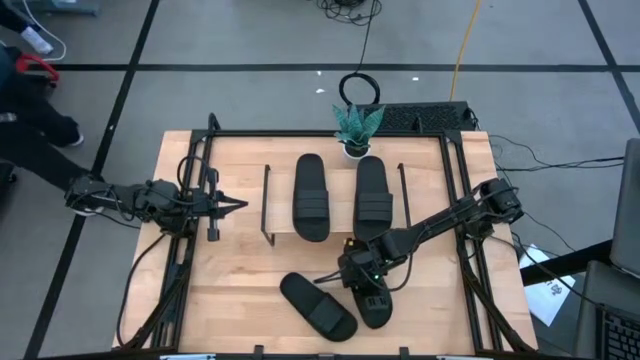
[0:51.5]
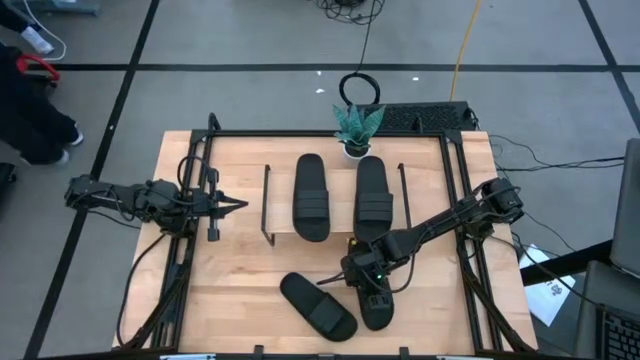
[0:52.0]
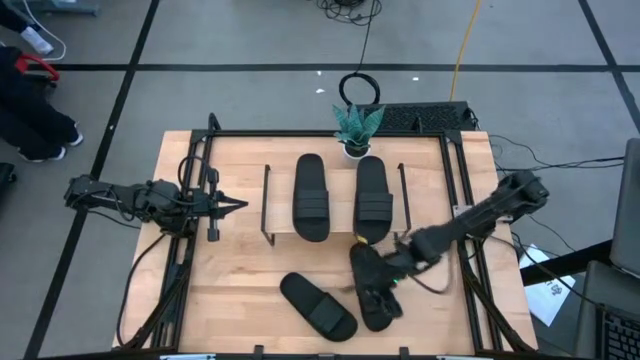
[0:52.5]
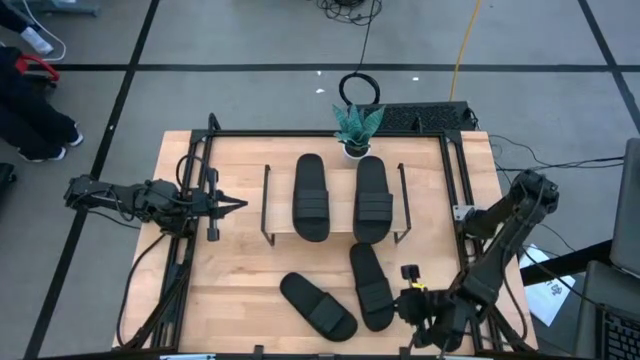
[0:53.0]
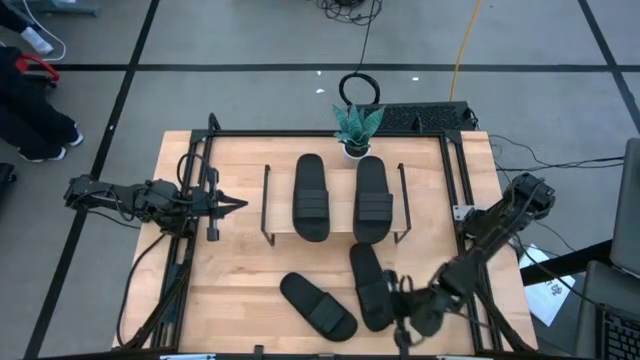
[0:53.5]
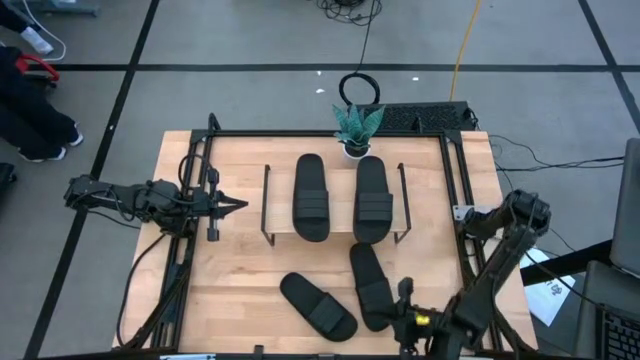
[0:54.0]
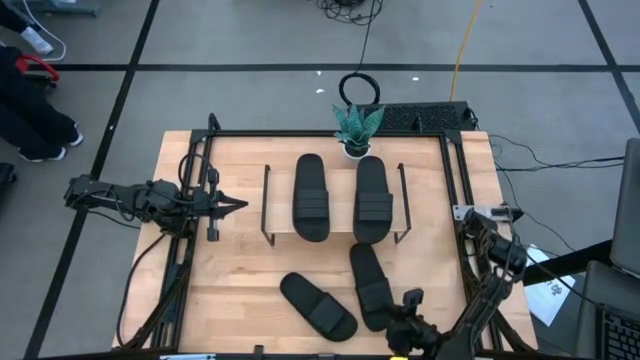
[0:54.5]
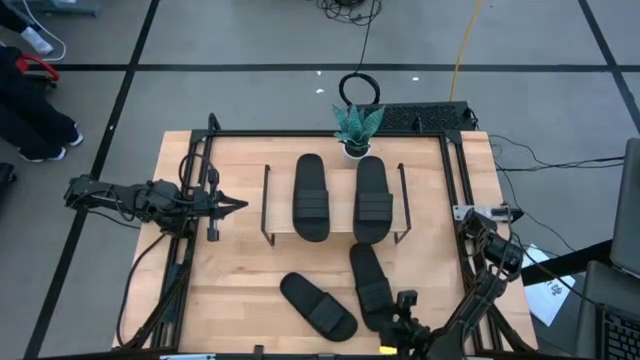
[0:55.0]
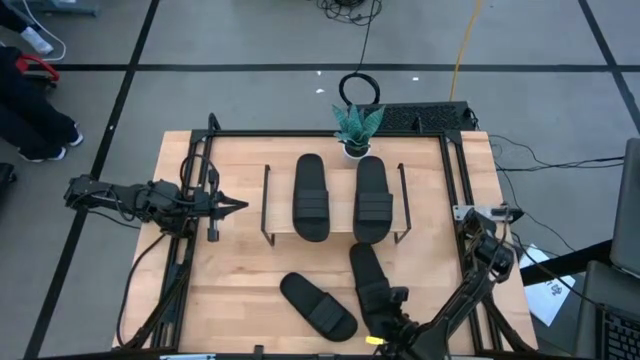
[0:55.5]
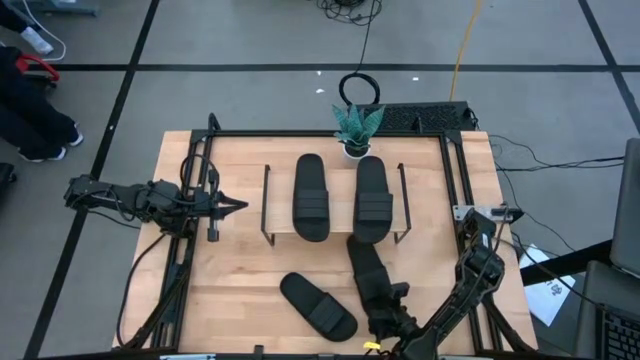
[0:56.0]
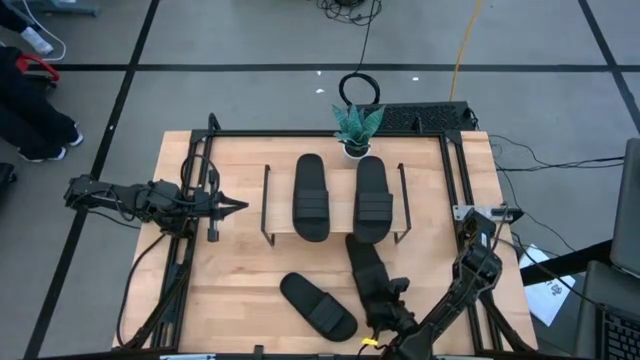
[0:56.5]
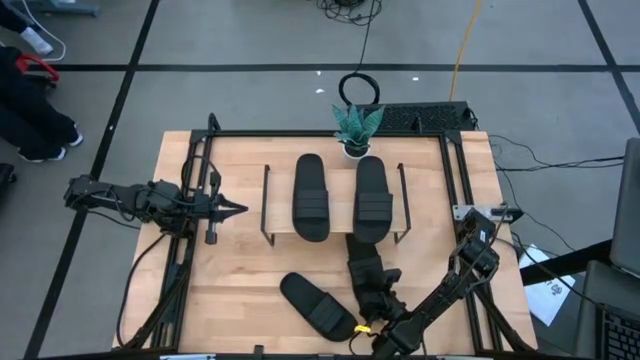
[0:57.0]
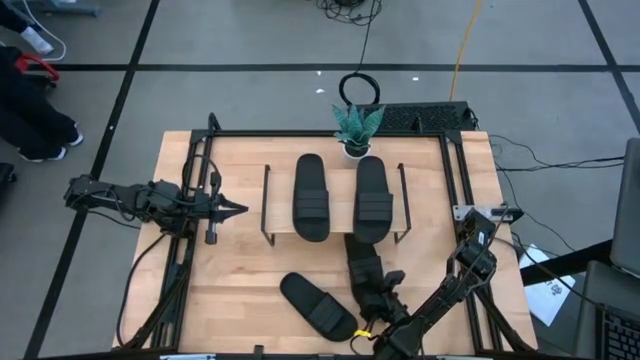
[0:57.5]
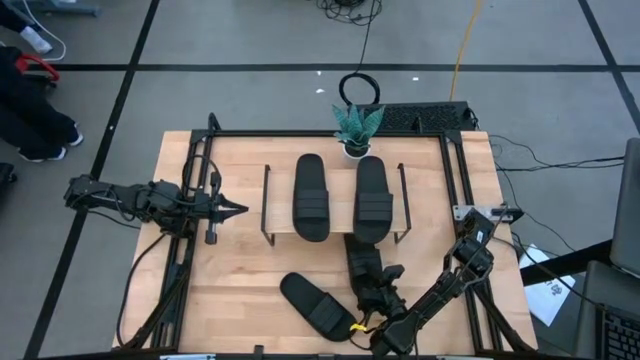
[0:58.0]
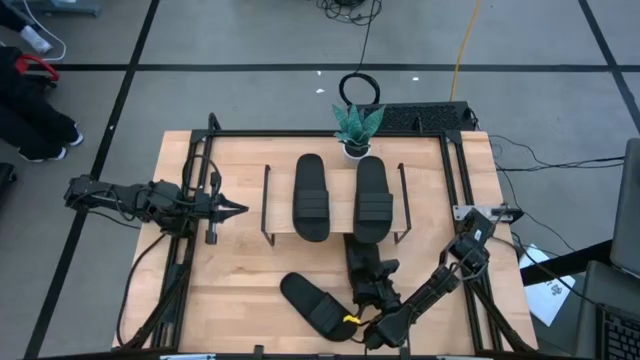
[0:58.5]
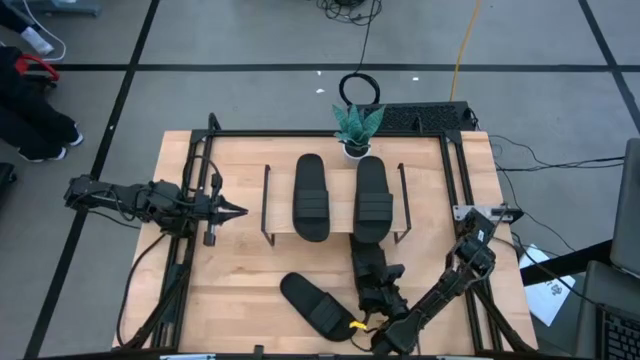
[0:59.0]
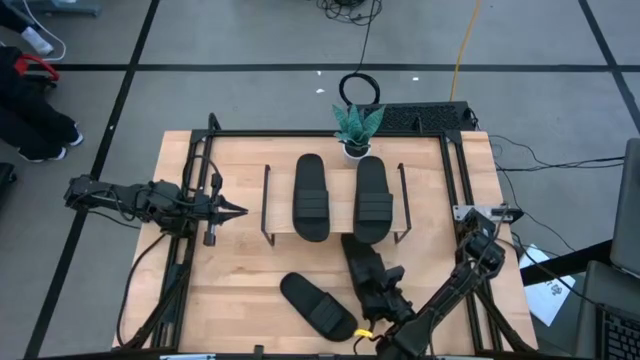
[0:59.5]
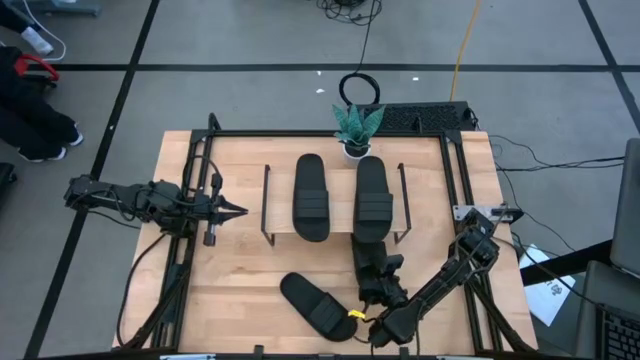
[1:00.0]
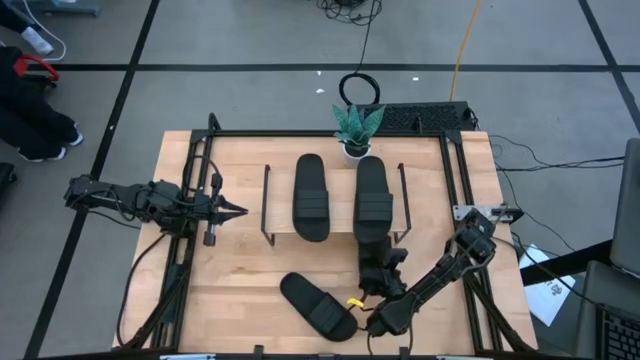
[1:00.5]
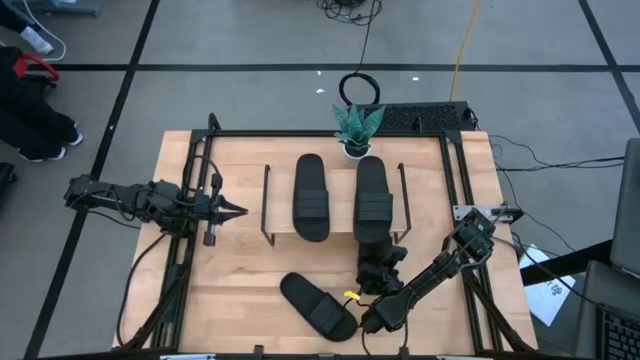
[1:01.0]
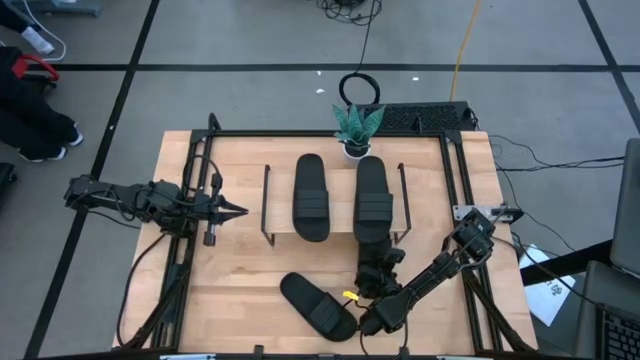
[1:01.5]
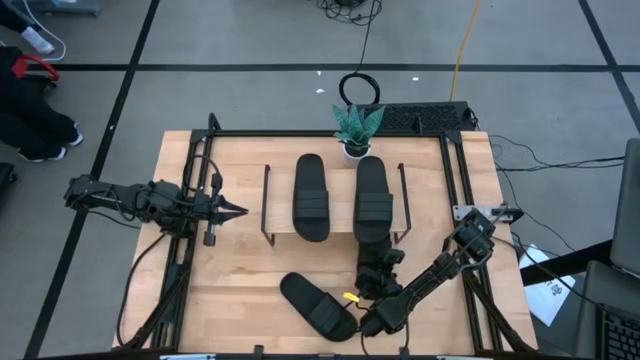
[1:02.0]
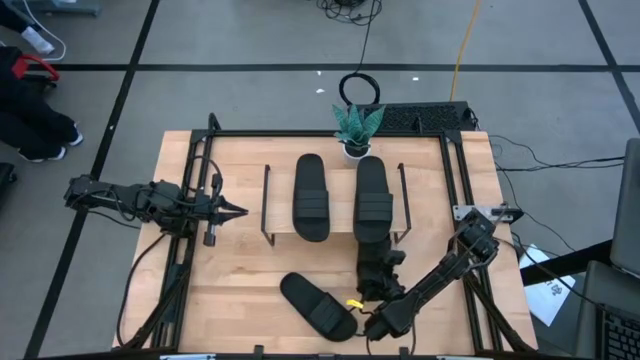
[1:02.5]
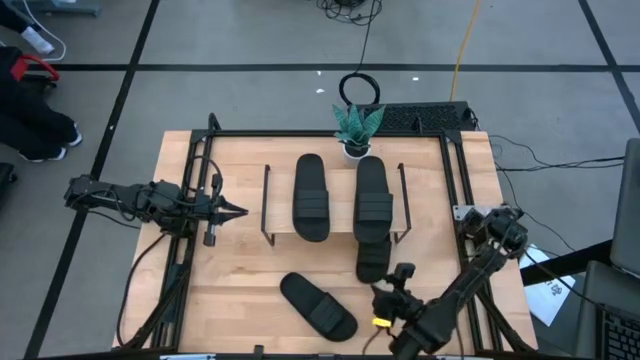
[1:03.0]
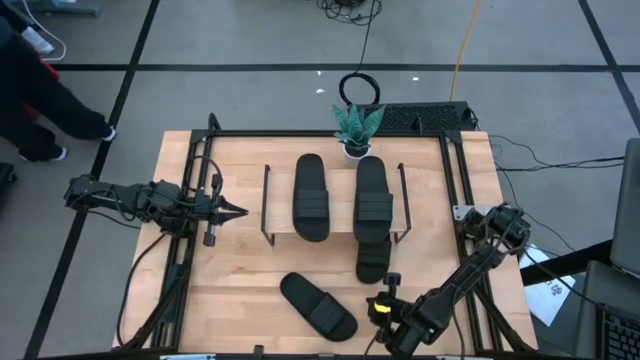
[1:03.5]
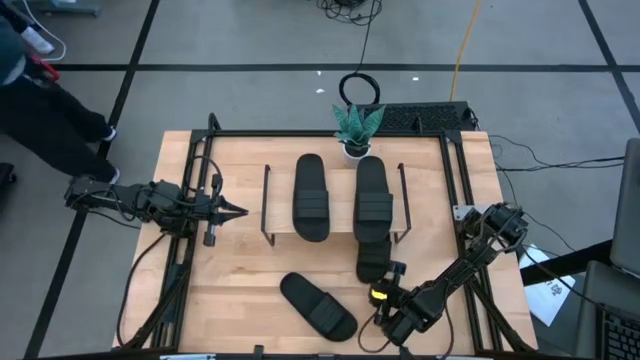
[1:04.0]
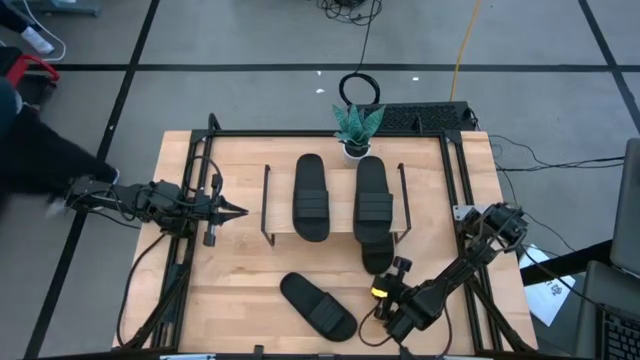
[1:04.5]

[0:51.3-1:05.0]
Task: Pick and place slides into the shelf
Put the black slide under the shelf

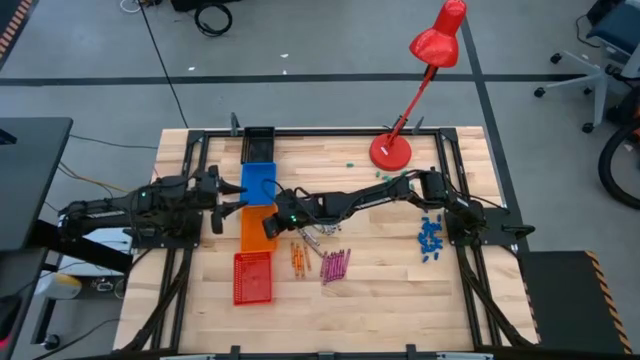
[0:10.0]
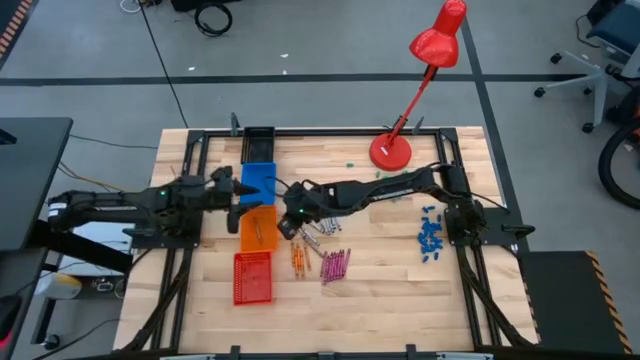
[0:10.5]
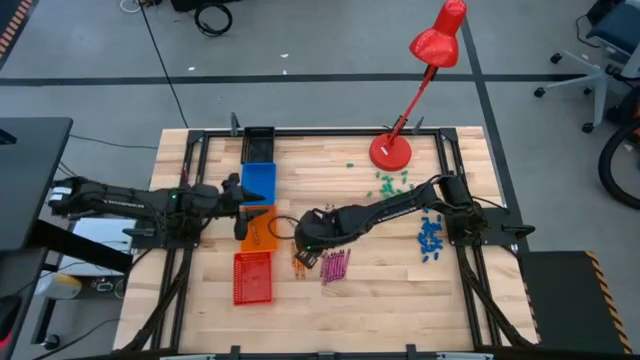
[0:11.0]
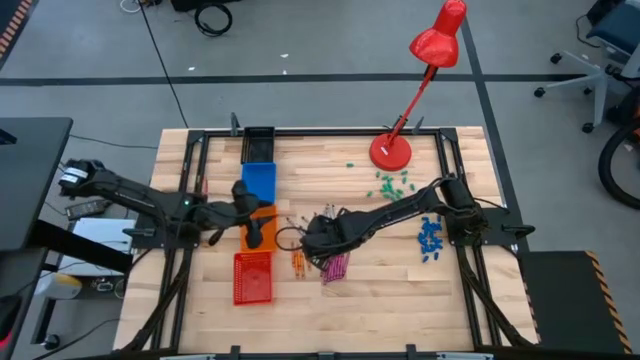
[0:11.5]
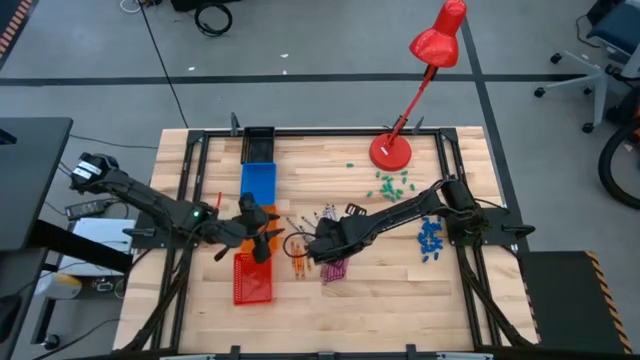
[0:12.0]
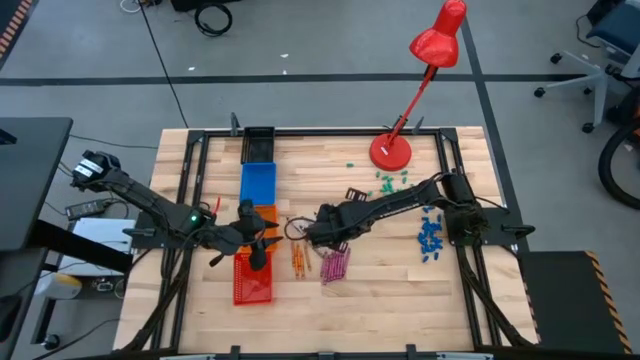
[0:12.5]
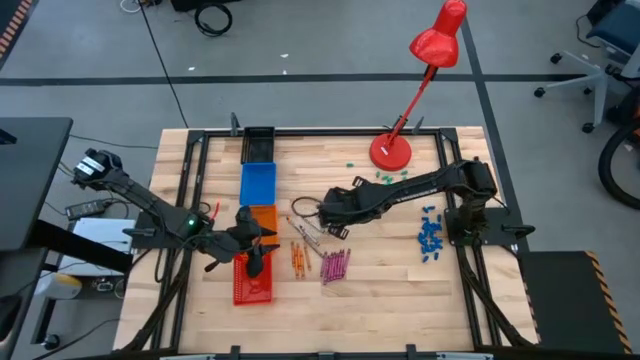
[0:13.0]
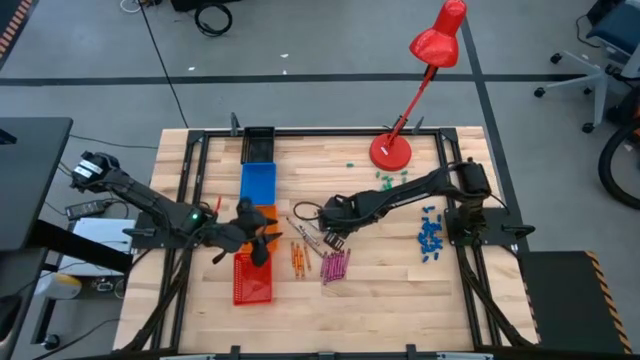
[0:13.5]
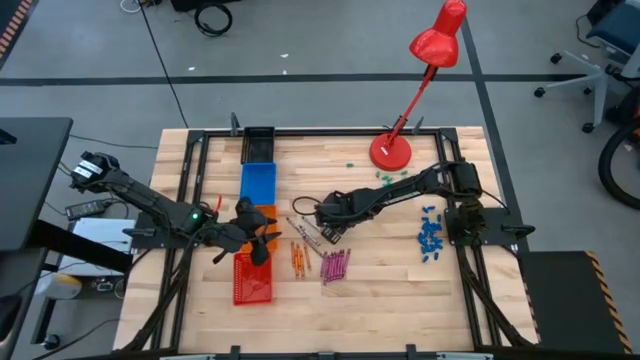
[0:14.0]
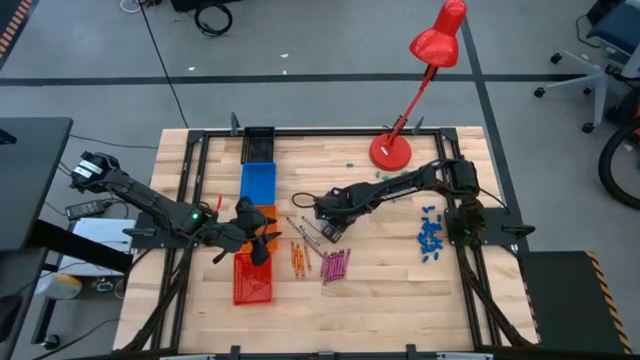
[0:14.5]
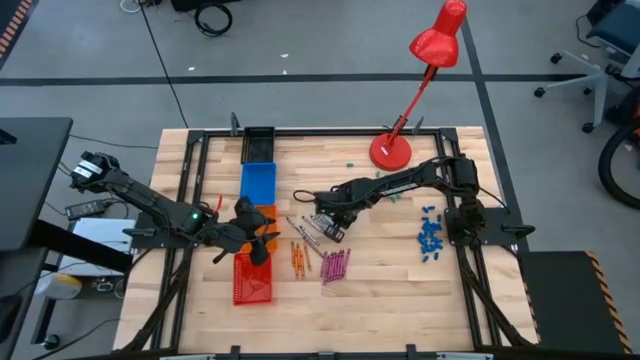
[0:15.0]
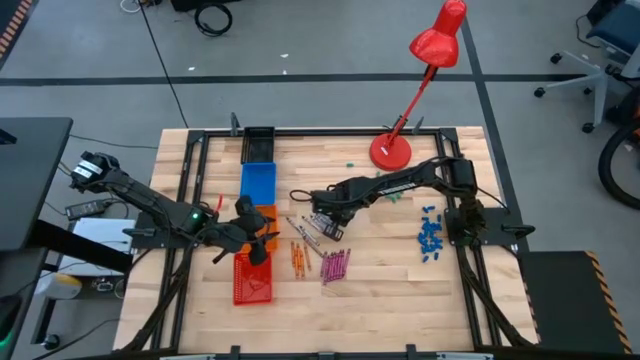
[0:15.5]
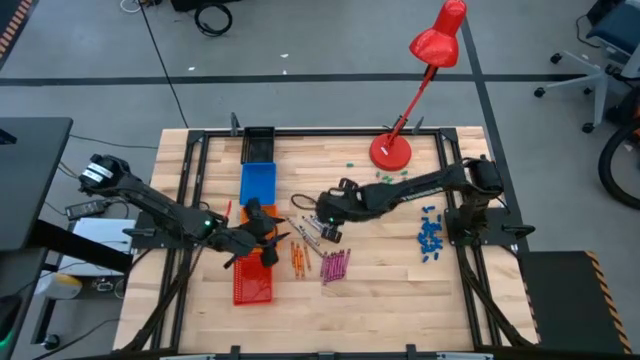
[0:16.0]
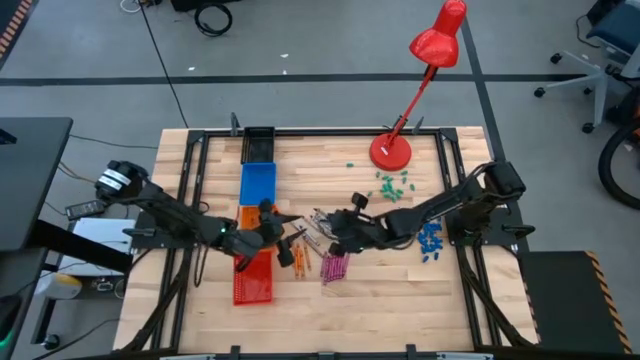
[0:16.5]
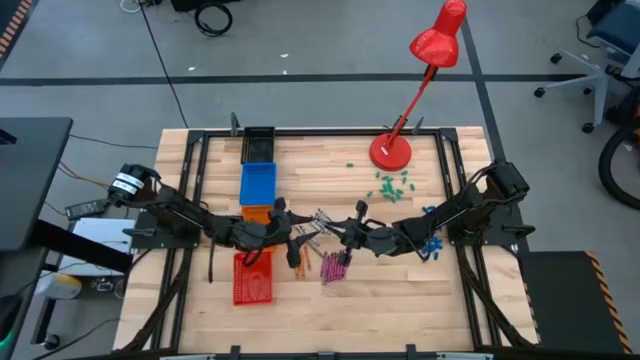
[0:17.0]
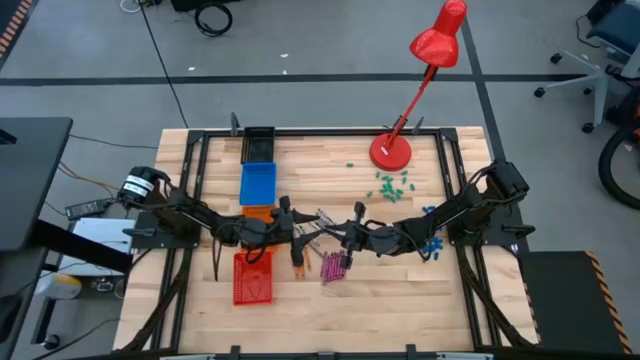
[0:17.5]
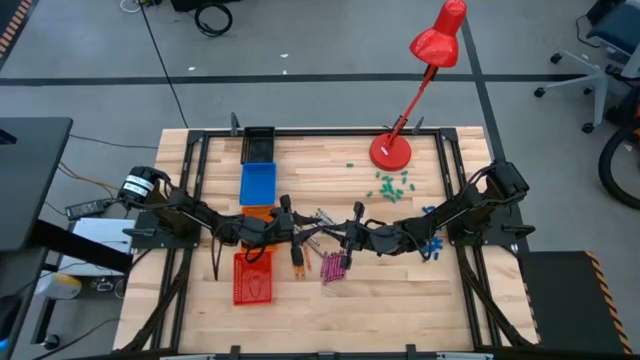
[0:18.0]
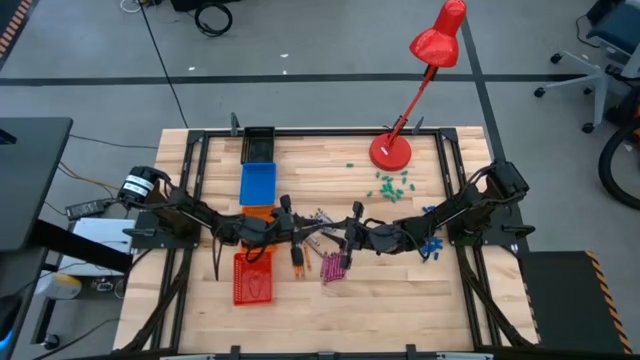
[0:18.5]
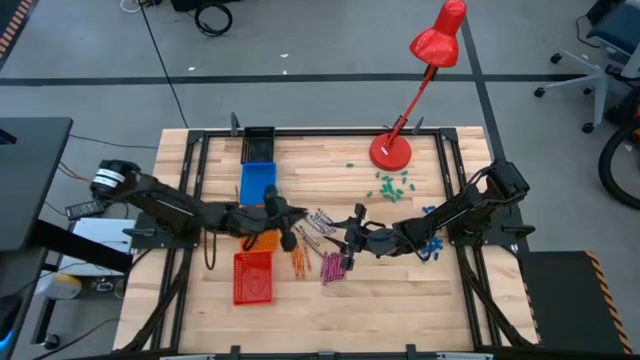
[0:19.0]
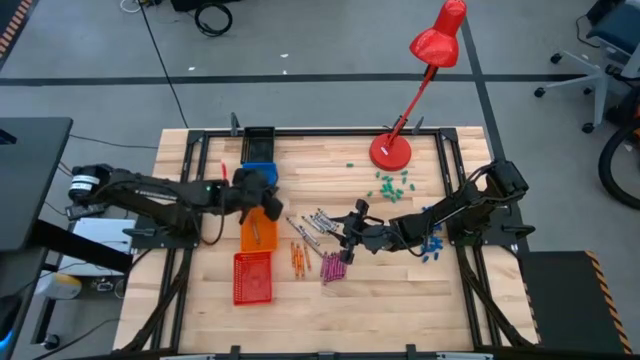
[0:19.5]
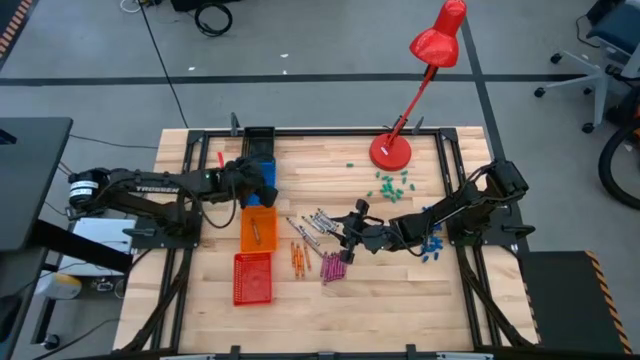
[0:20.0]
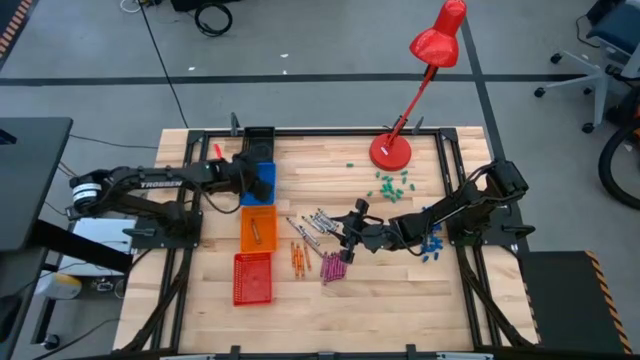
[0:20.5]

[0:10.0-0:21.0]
Task: Sort crayons
Put the black crayon into the blue bin
